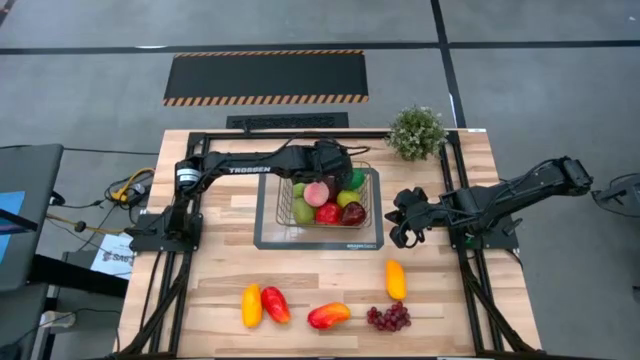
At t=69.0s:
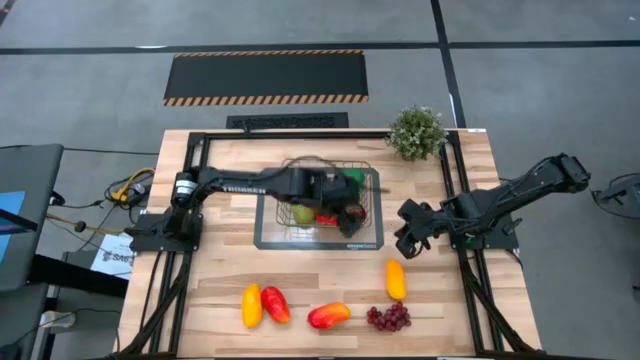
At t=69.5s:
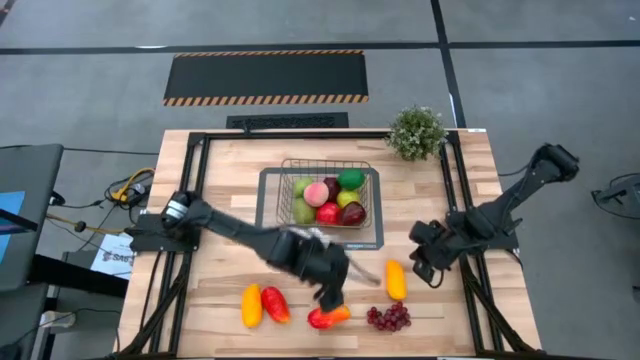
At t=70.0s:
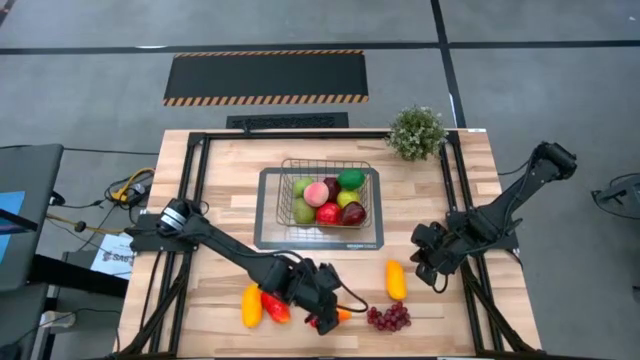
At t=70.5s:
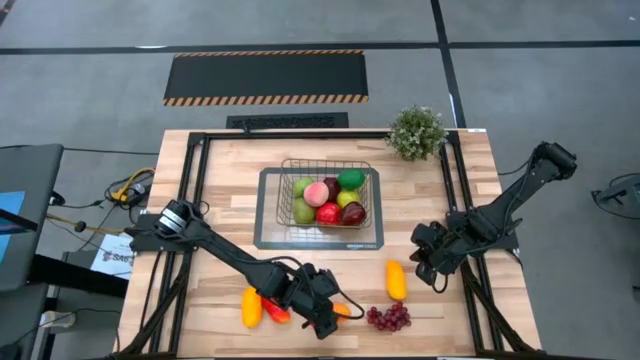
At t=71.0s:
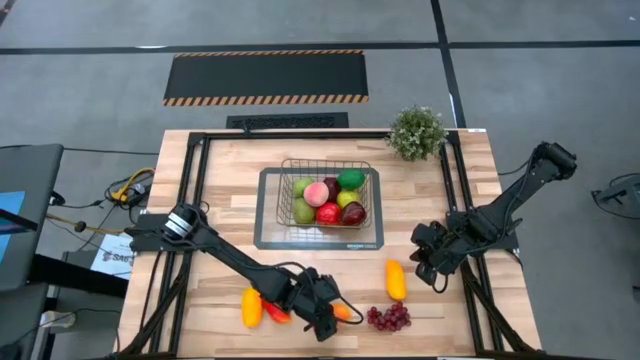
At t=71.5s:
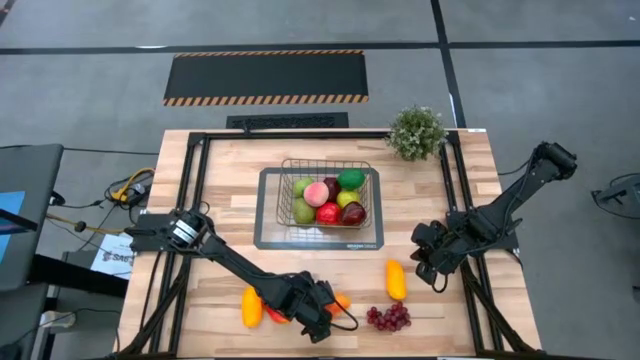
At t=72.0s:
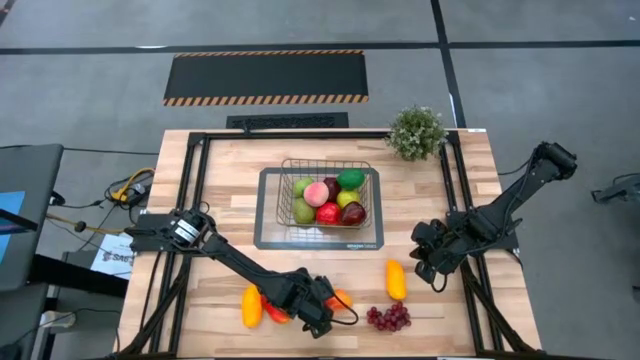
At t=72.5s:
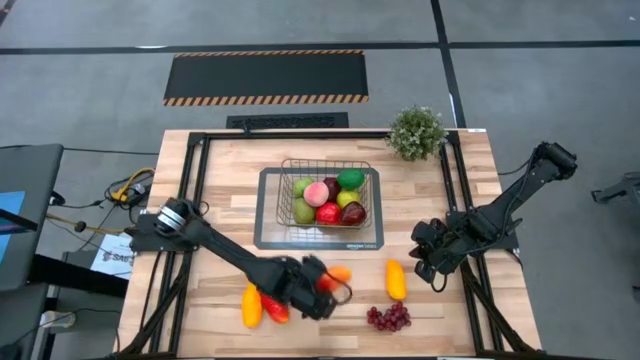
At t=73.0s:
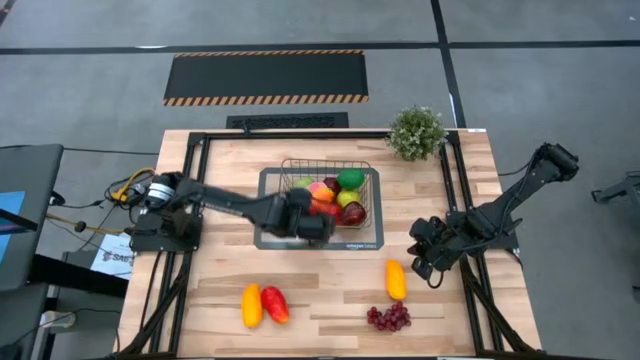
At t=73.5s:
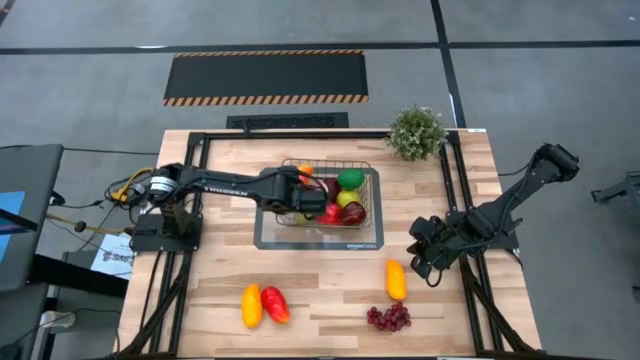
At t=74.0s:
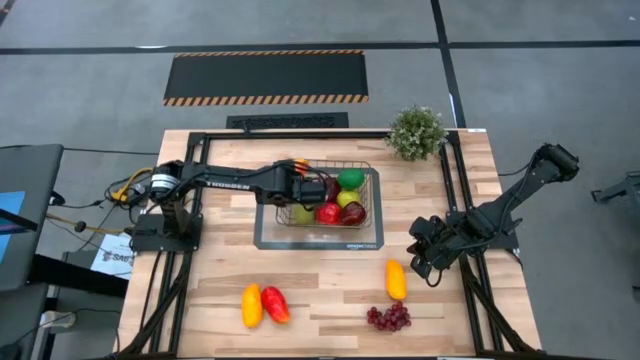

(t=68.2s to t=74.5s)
Task: Build produce basket
Put the right orange mango into the bin

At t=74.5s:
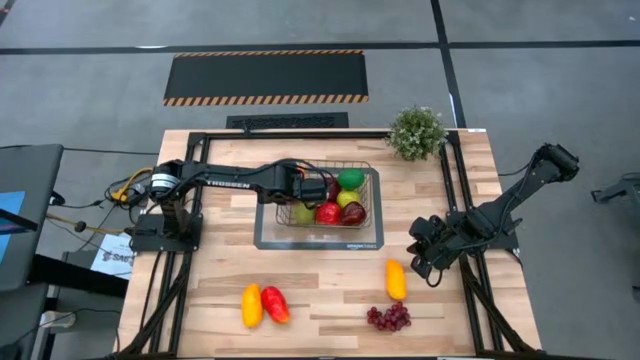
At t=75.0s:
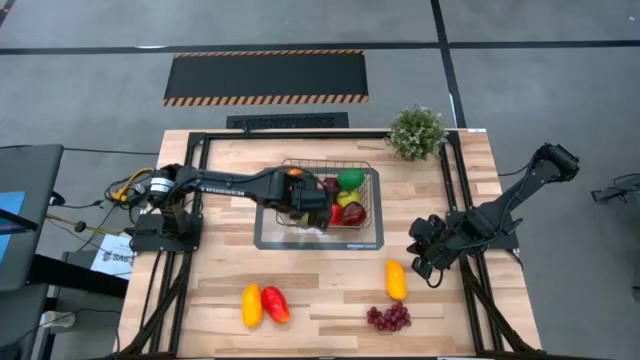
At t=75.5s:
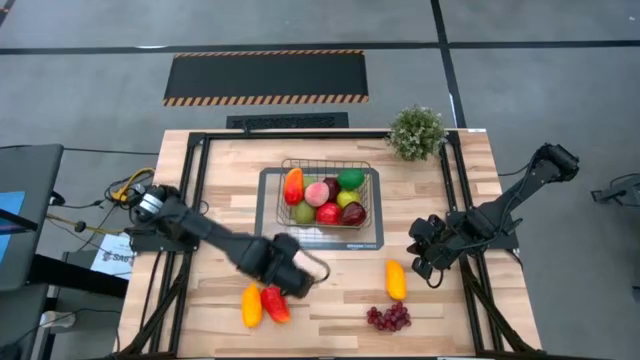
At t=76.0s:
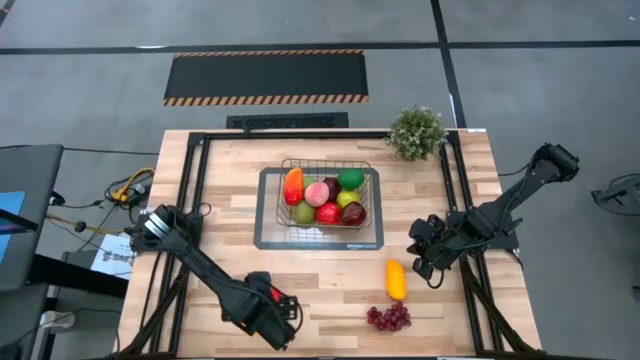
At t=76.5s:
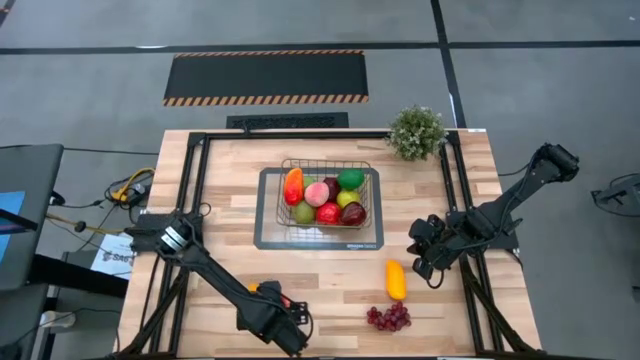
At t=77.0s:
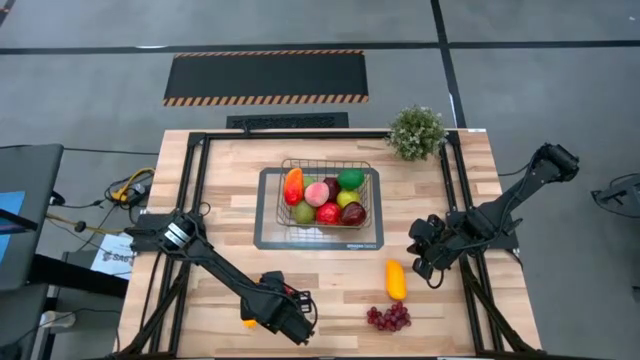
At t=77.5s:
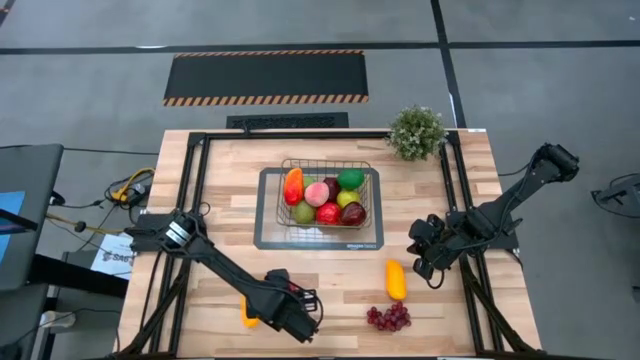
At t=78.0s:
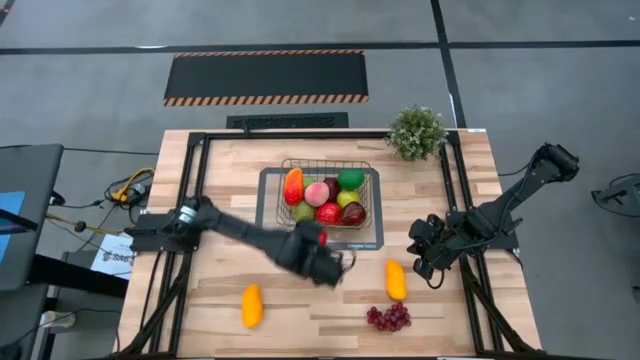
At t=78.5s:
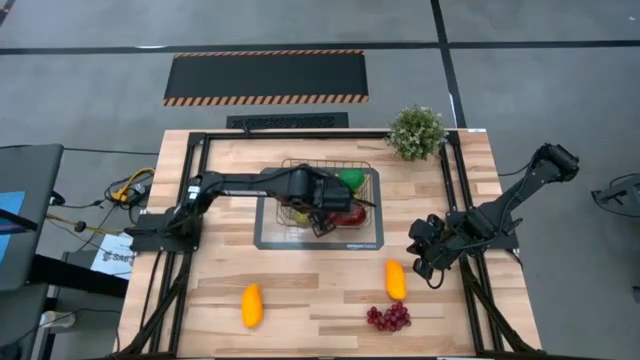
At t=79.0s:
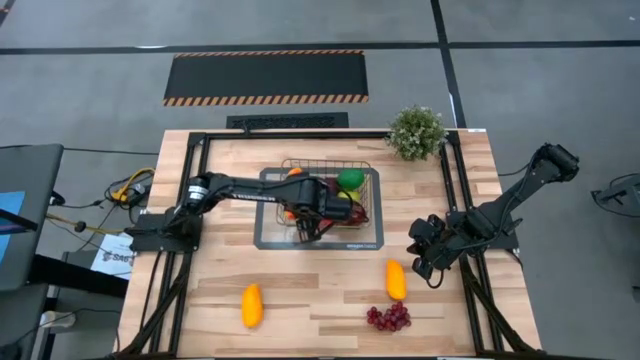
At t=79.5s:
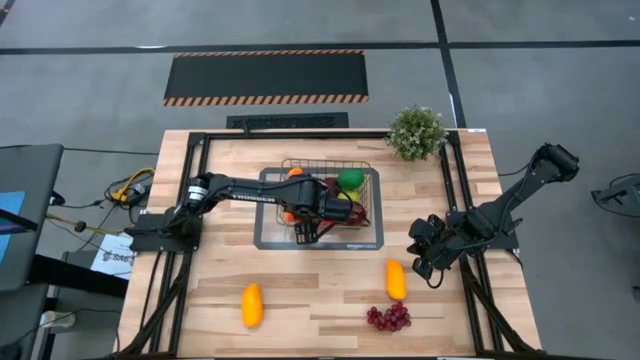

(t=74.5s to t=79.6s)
Put the orange mango into the bin

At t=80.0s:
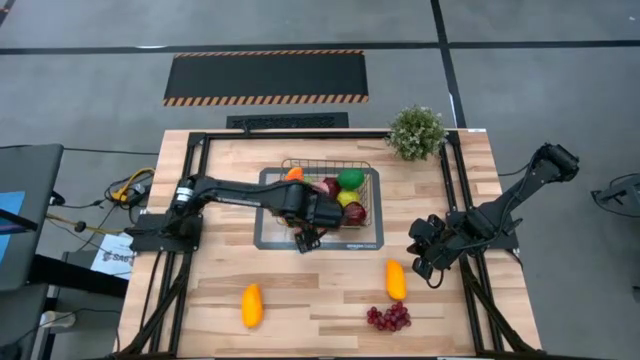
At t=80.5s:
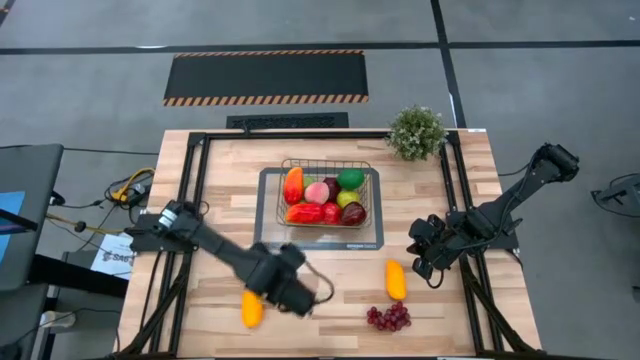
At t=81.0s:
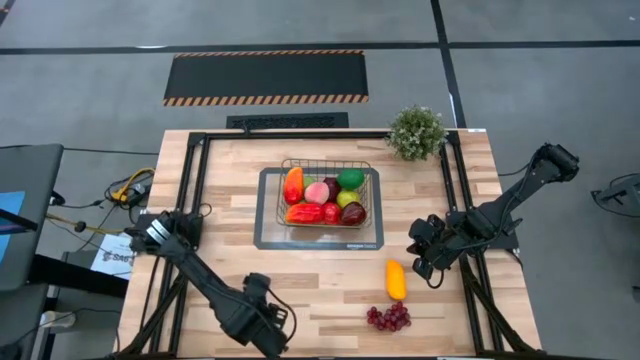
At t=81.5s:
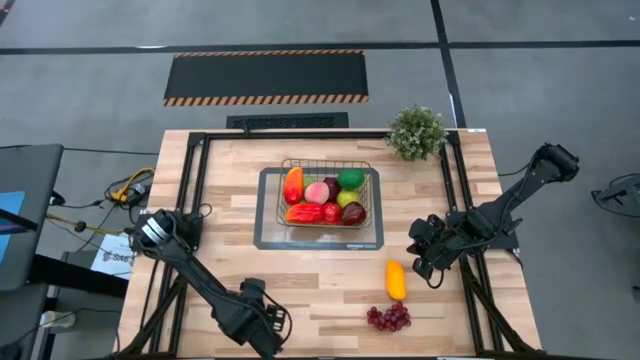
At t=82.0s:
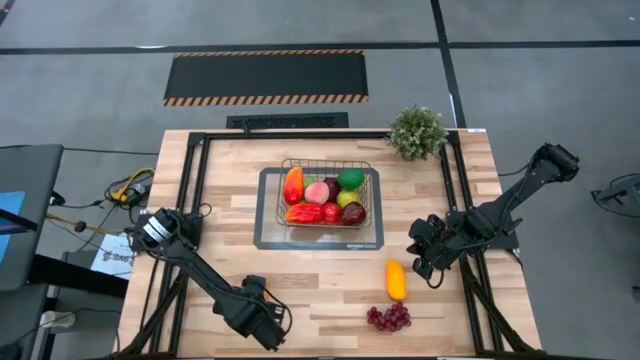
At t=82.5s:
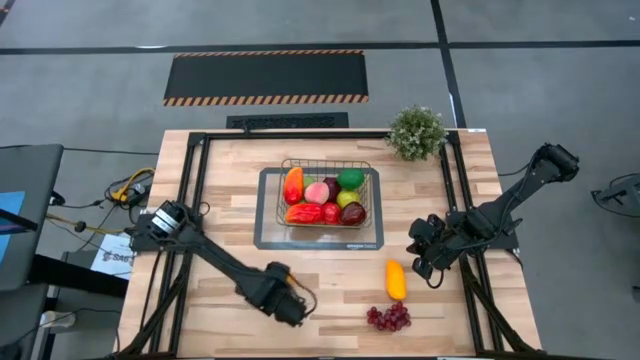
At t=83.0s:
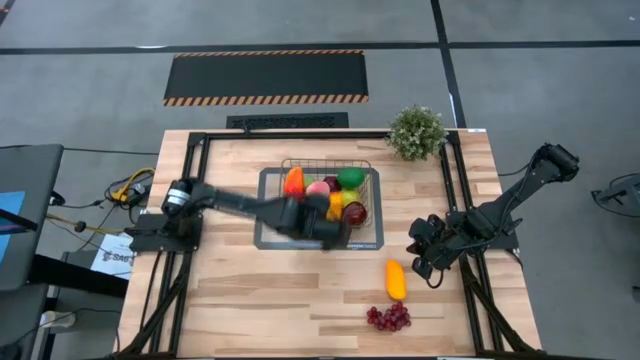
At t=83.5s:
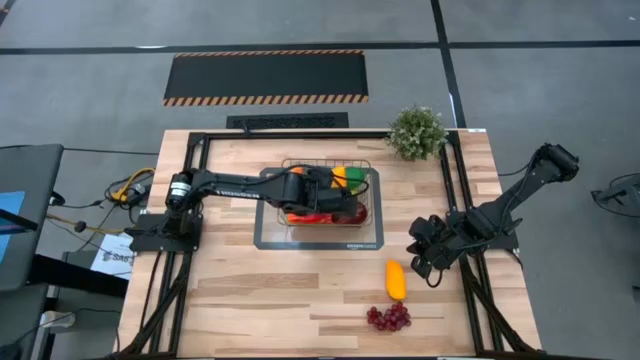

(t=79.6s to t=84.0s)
Put the left yellow mango into the bin

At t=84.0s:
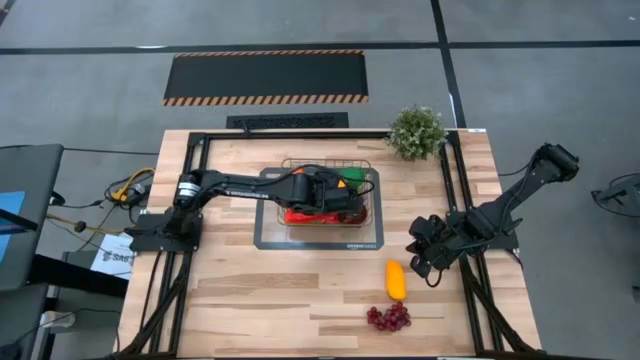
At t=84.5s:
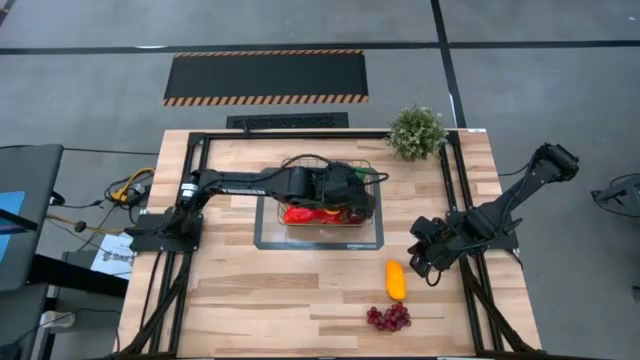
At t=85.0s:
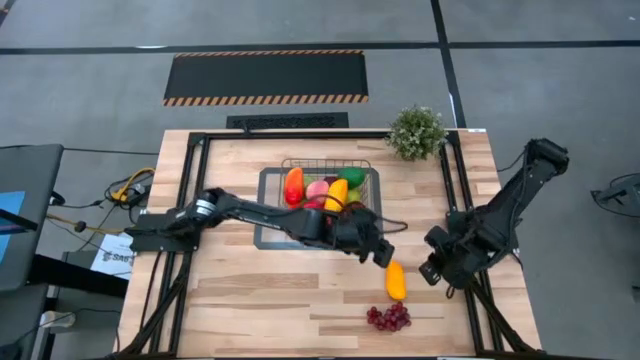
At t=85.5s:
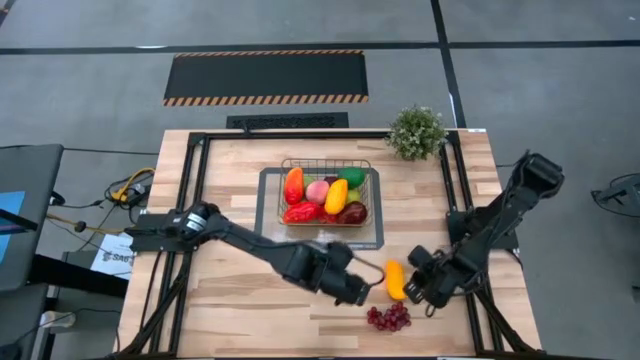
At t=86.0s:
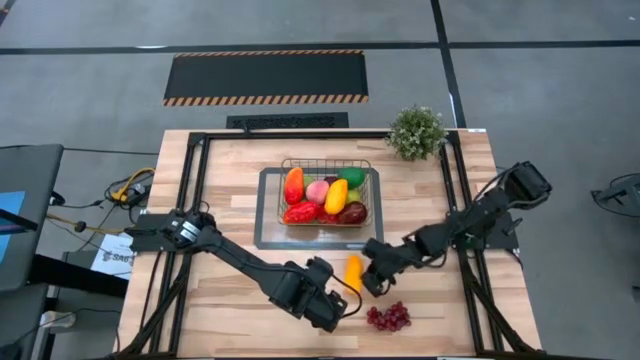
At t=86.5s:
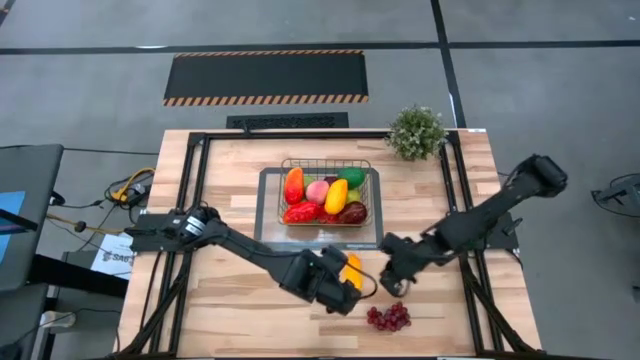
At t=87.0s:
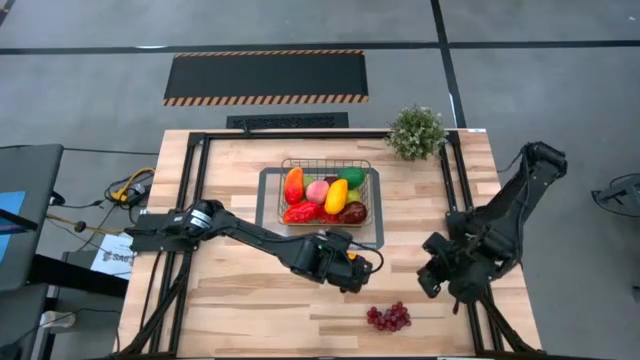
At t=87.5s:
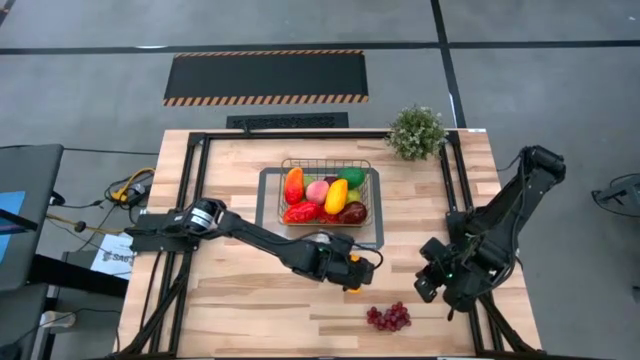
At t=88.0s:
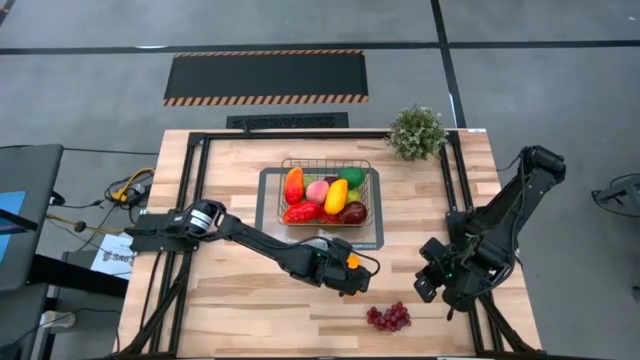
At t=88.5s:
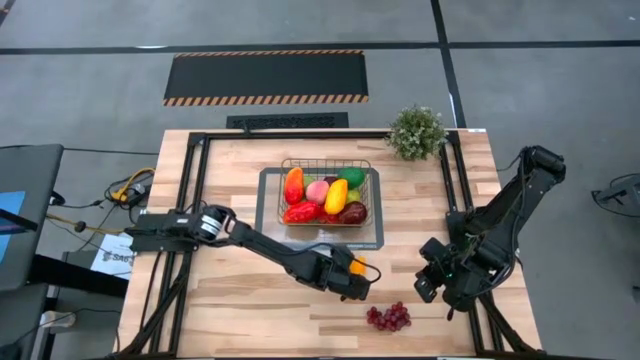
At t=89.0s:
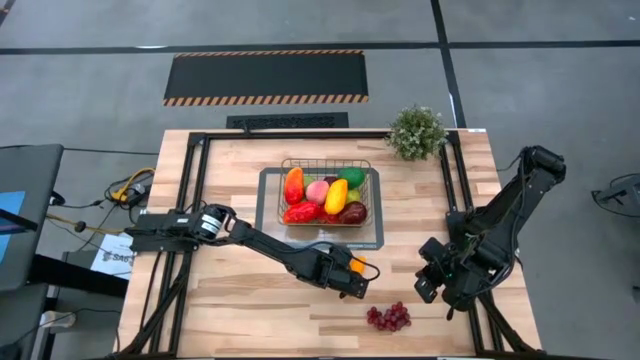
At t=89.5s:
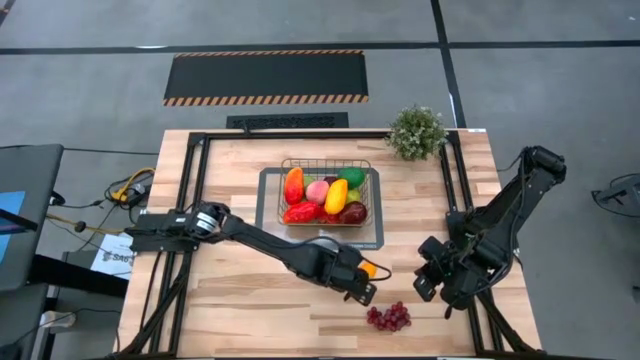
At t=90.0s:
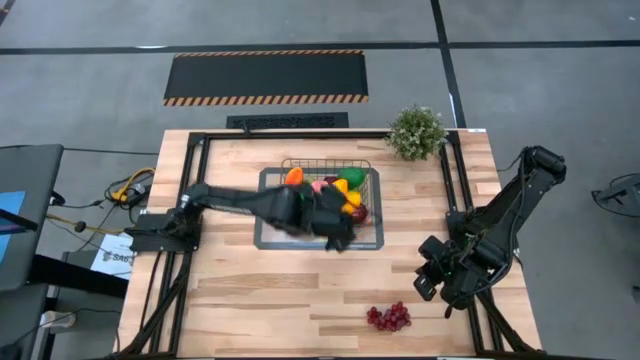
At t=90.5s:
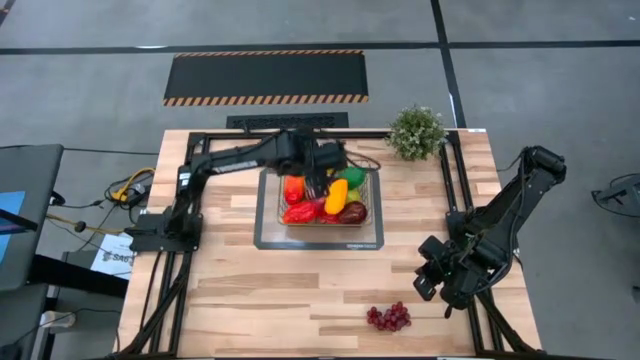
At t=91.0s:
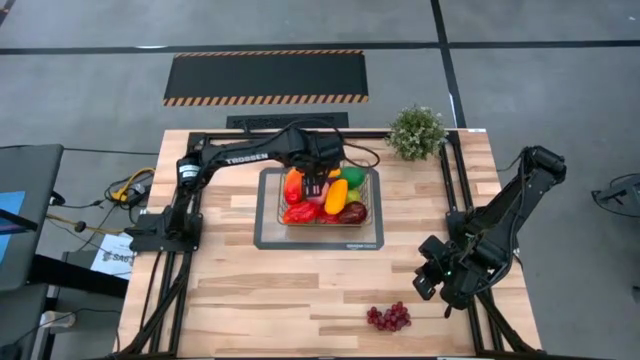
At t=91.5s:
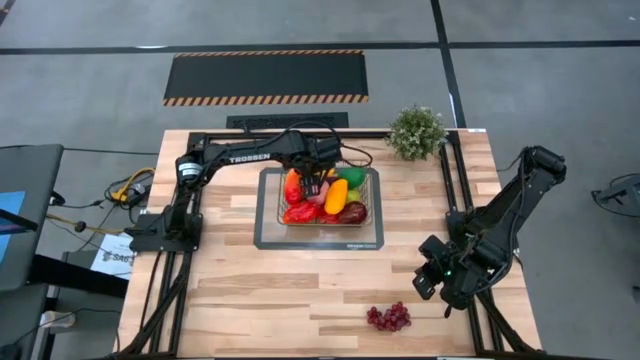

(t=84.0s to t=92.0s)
Put the yellow mango into the bin
